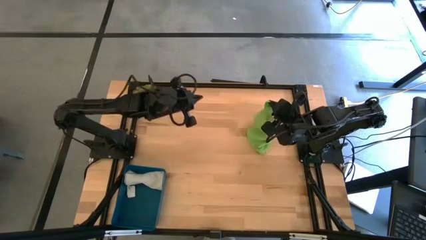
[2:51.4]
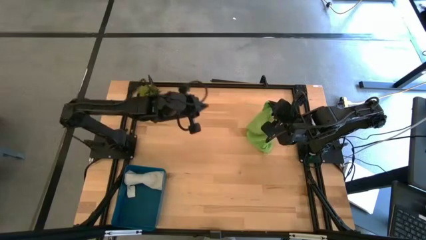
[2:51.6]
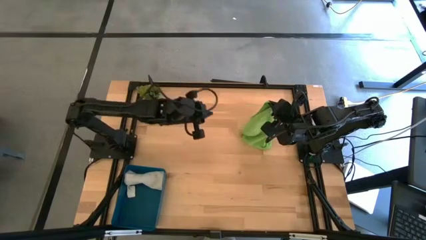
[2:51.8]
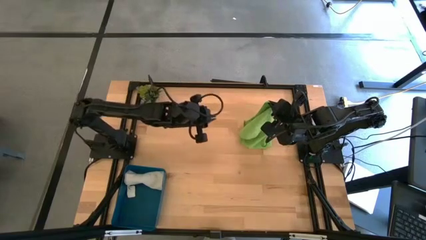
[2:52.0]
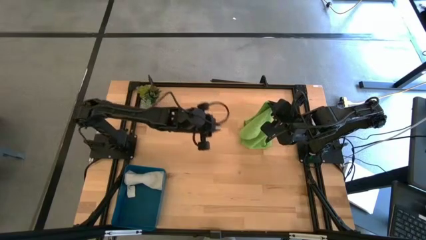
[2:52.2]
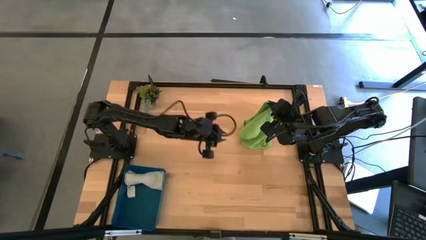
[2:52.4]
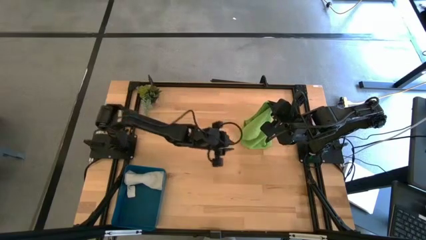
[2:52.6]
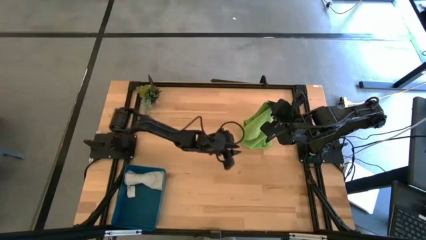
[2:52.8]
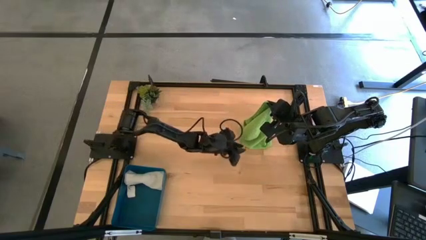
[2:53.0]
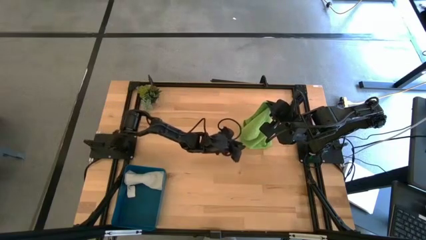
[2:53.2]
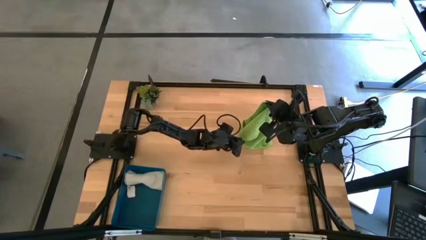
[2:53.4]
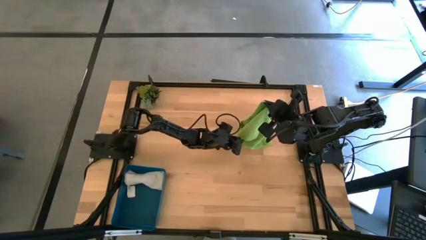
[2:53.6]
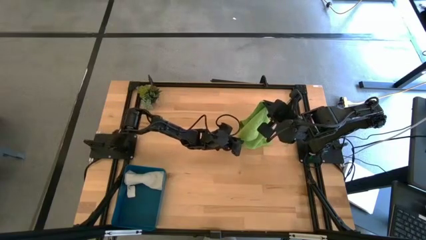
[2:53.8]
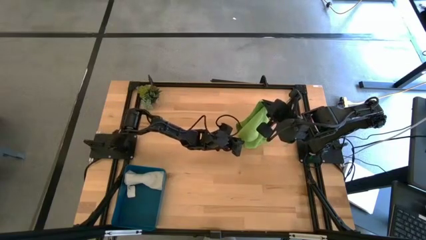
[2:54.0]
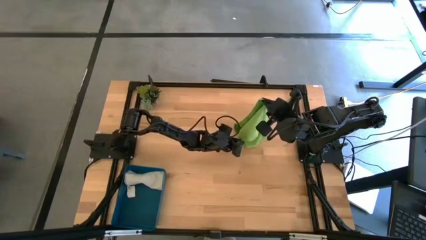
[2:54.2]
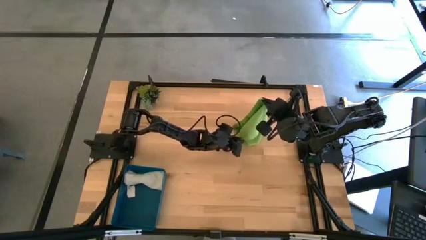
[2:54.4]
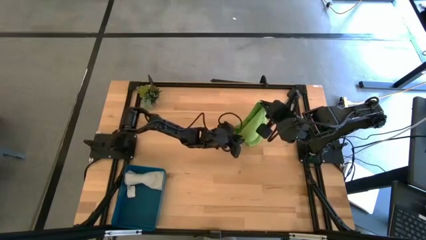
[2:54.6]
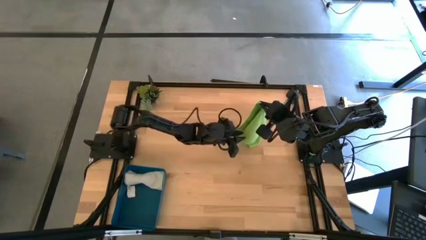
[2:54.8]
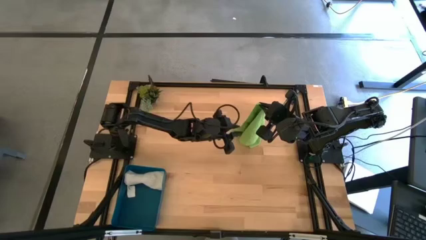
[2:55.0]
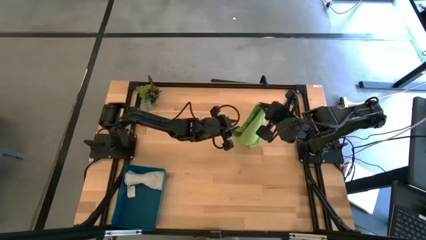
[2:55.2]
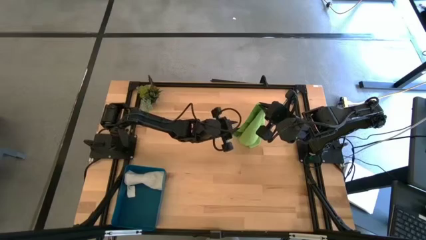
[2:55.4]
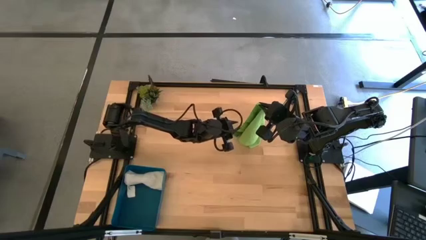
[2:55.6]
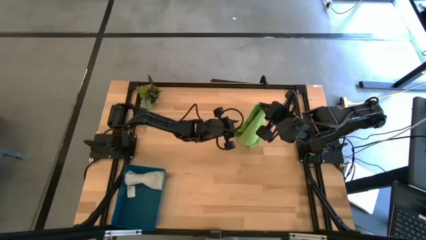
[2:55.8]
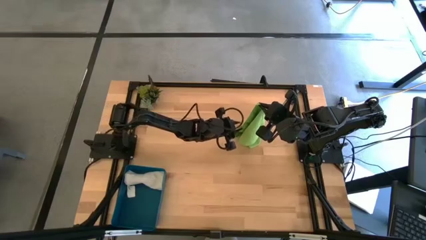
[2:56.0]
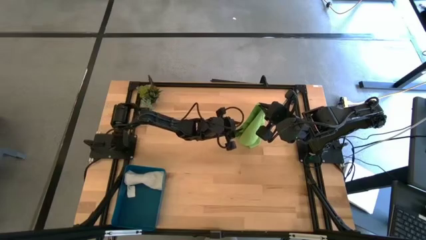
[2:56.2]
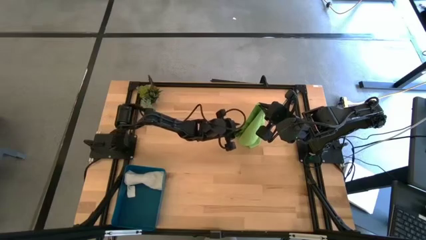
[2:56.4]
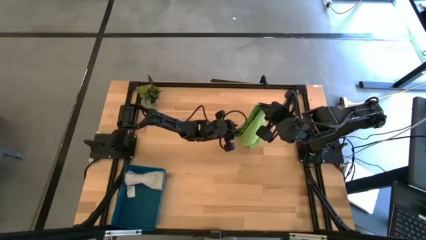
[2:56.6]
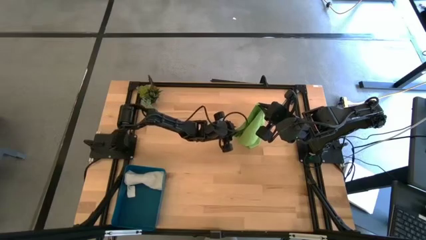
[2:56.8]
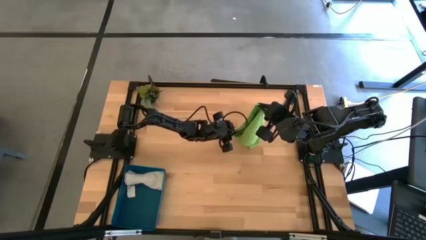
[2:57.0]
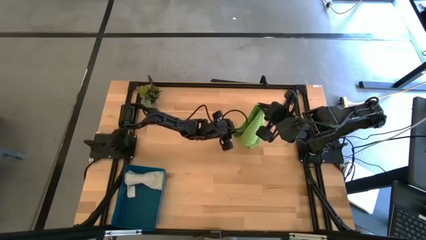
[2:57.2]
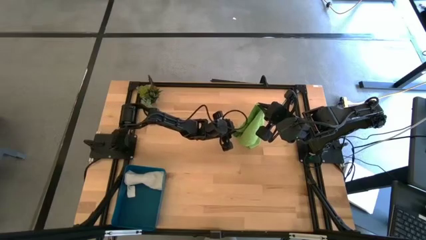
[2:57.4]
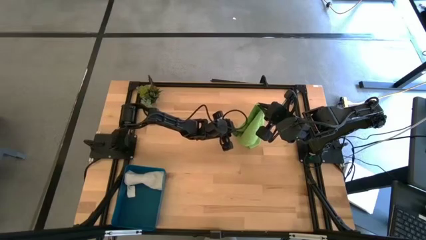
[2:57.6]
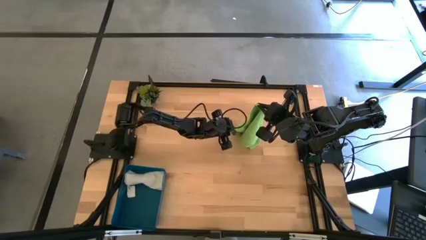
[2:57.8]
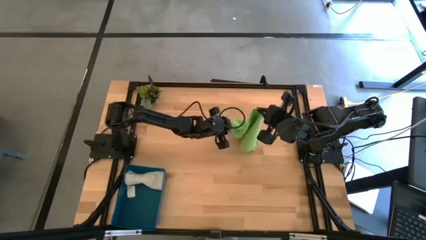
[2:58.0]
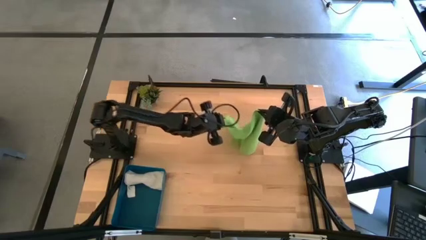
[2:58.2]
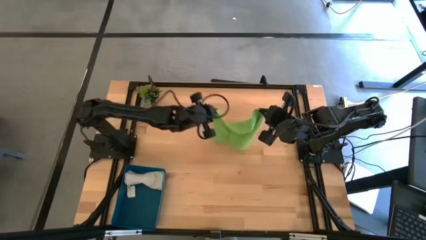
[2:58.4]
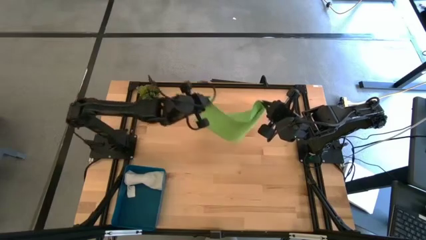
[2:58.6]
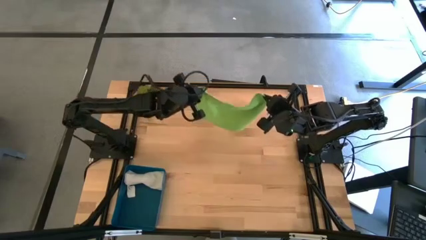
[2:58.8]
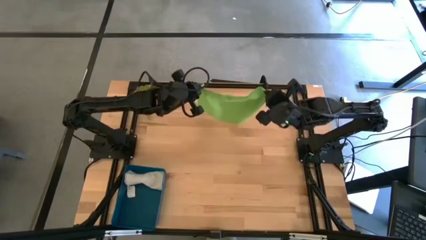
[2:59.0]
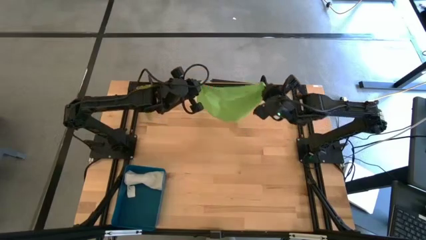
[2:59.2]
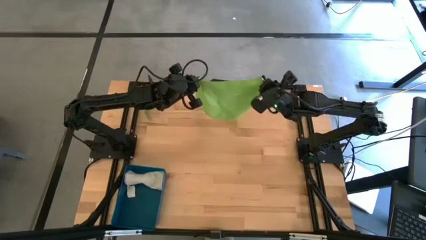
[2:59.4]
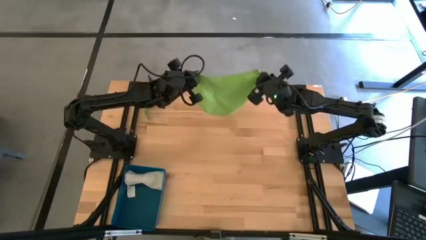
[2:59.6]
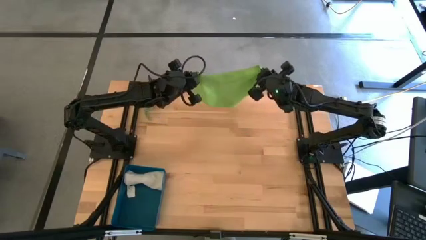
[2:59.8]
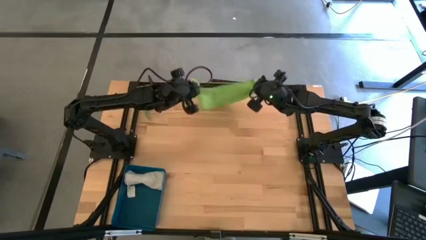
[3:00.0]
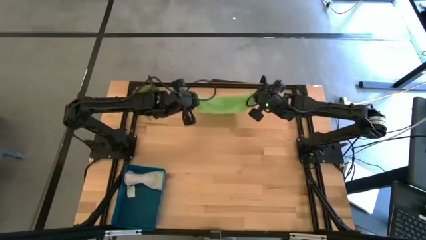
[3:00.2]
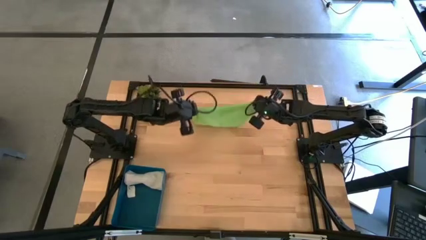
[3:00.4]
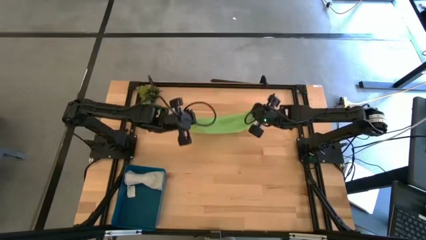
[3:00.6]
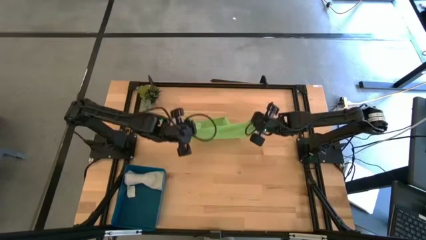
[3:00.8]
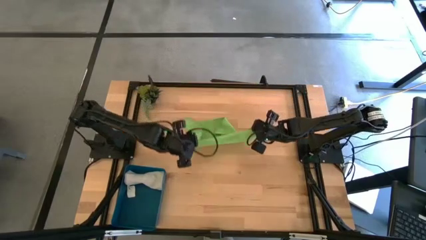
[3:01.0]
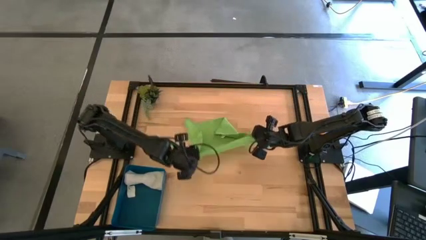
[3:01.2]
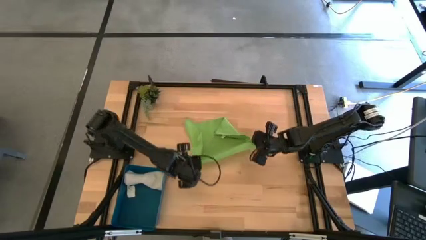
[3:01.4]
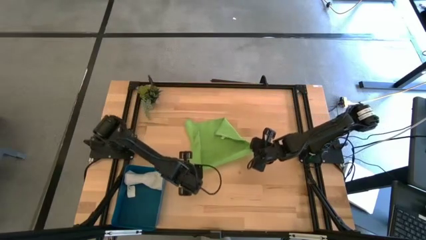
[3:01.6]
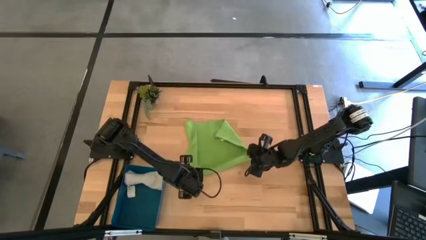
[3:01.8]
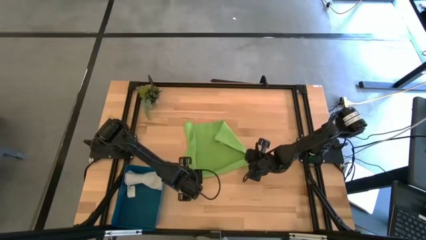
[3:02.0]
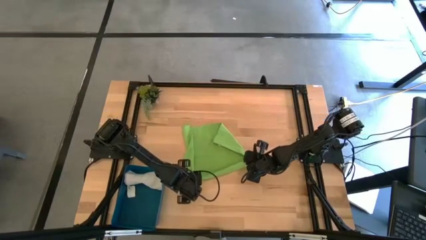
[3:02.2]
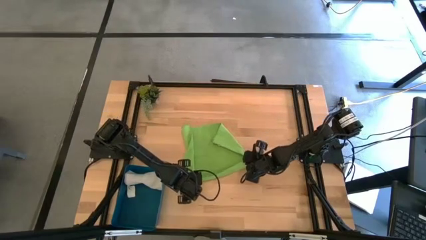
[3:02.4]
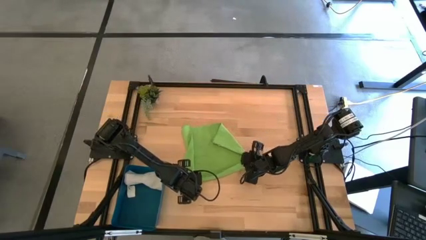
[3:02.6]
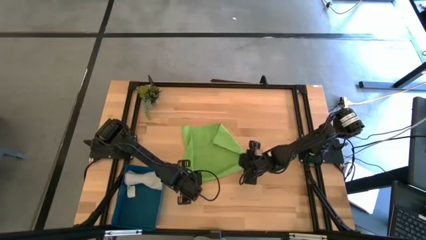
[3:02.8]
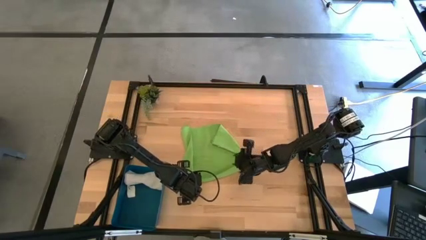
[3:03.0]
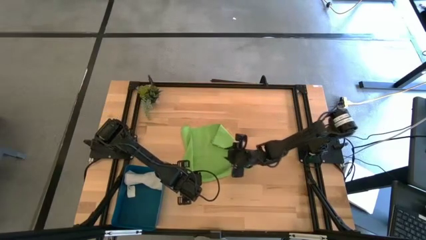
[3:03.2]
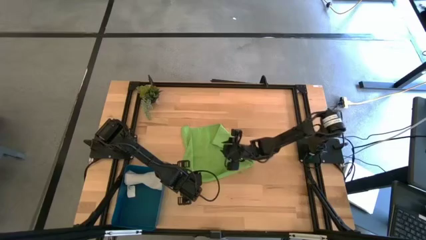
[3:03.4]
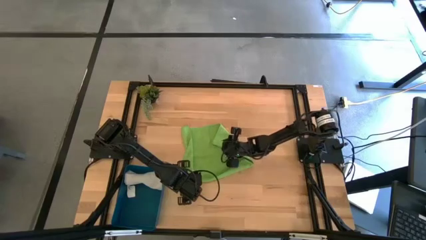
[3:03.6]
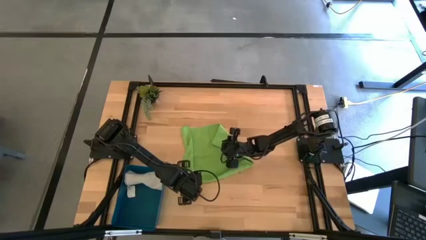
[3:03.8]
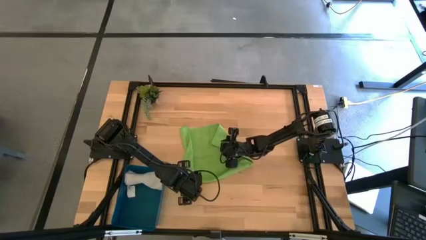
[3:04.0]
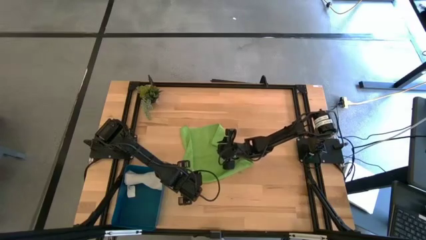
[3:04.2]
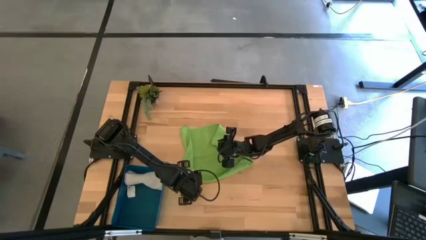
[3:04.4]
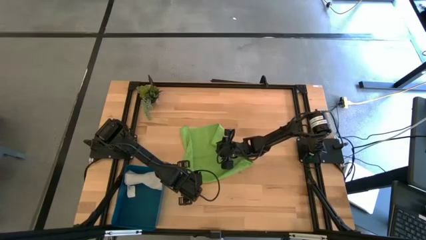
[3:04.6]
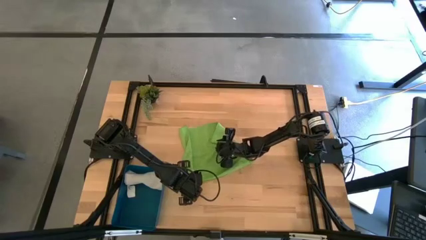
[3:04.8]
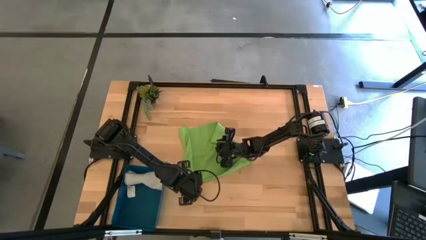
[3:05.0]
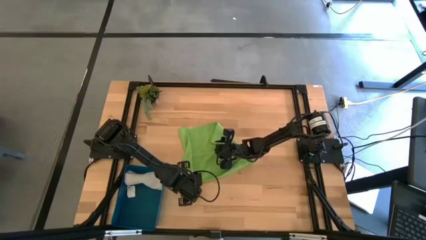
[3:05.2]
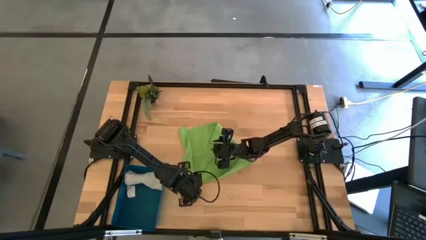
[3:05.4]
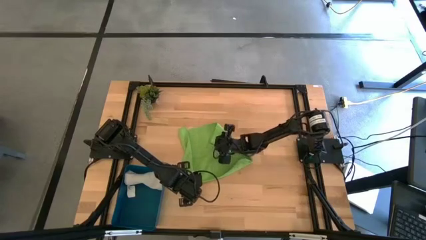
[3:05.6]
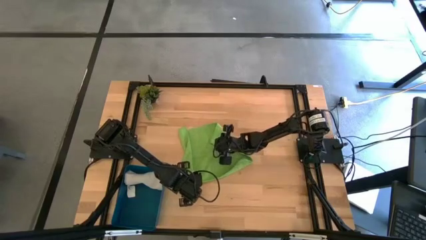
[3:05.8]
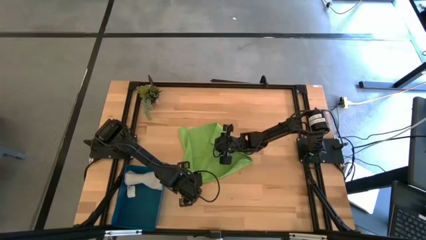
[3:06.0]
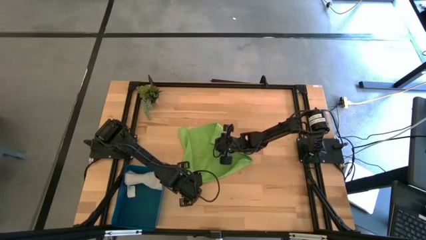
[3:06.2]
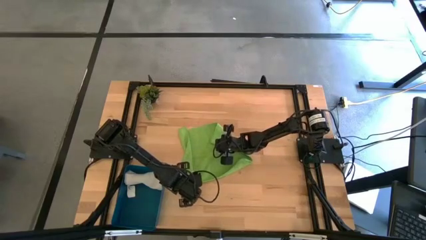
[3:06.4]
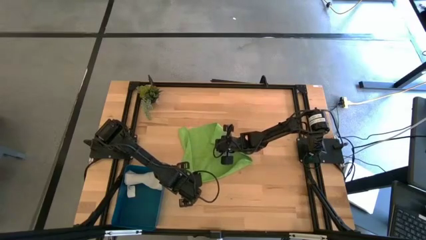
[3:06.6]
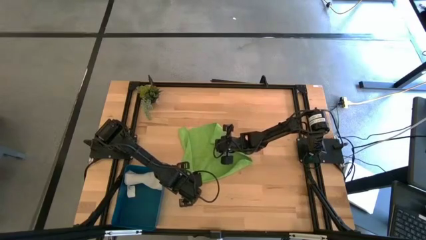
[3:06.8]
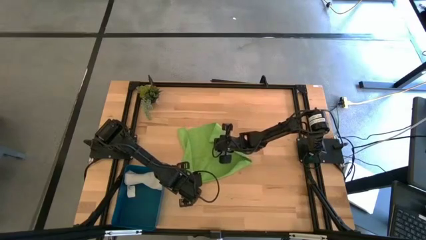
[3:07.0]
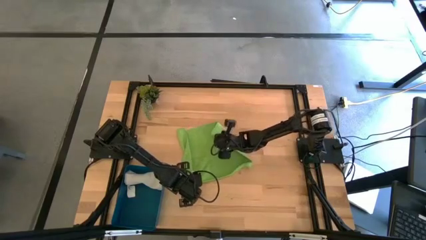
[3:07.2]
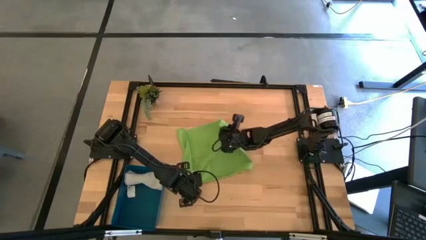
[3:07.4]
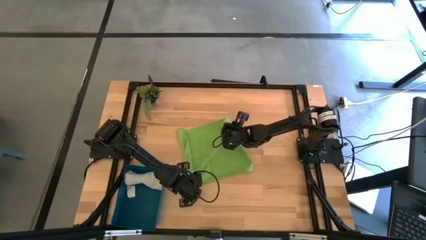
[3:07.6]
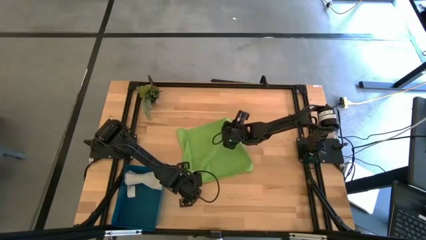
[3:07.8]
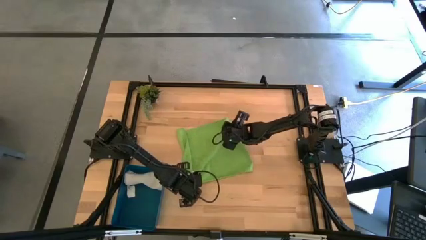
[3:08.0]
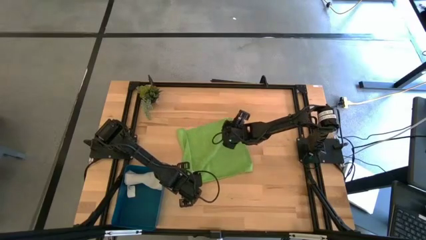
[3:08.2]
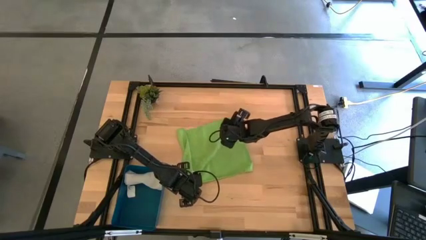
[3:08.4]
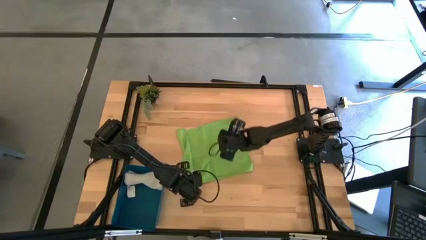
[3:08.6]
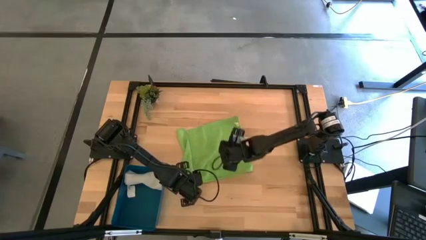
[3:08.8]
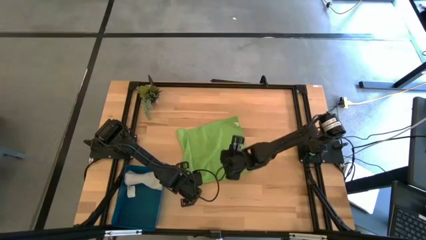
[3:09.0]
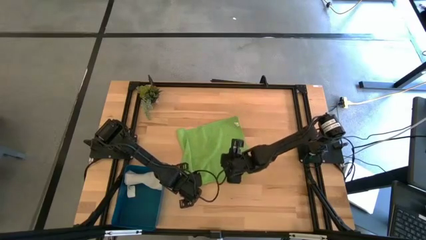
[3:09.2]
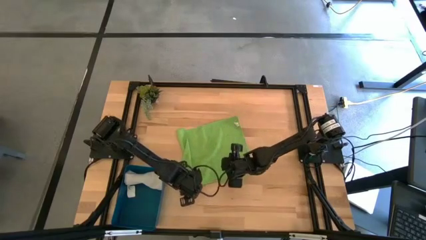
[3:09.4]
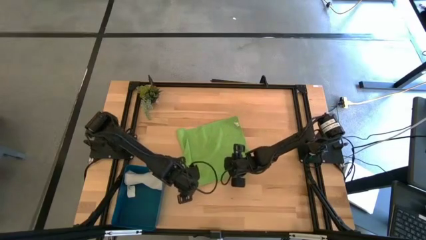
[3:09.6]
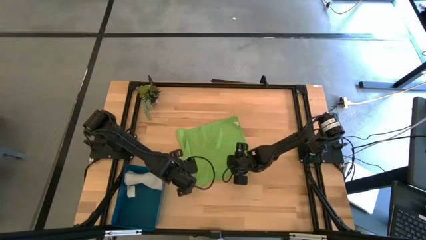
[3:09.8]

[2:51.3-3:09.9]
Task: Roll microfiber towels into tight, uniform cylinder then place into a basket
Roll the green towel
